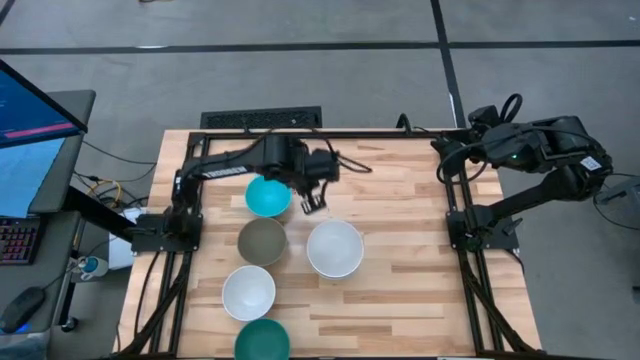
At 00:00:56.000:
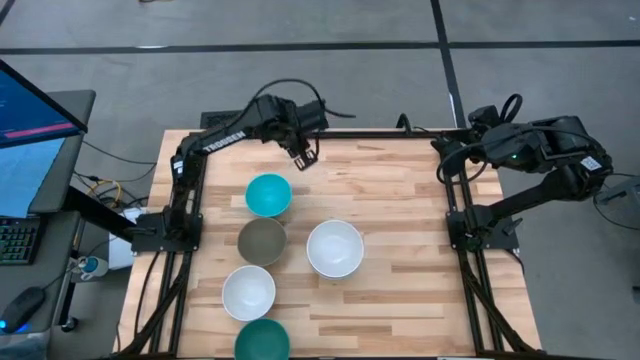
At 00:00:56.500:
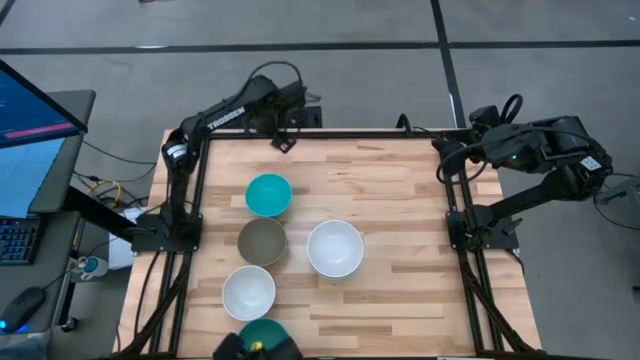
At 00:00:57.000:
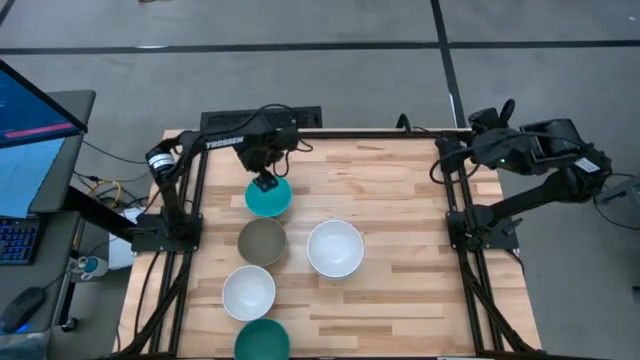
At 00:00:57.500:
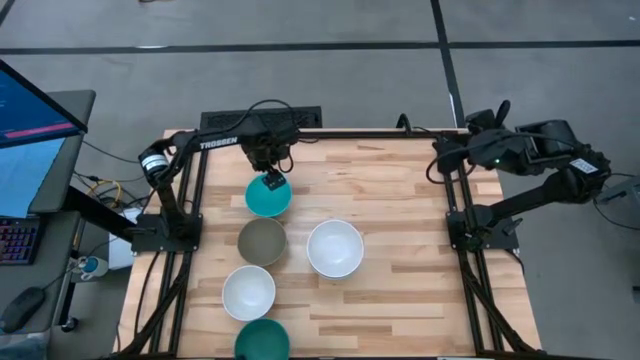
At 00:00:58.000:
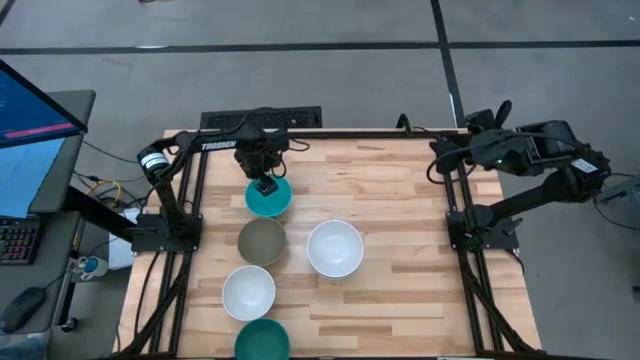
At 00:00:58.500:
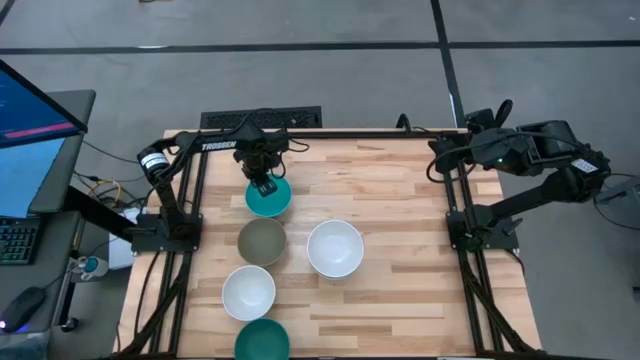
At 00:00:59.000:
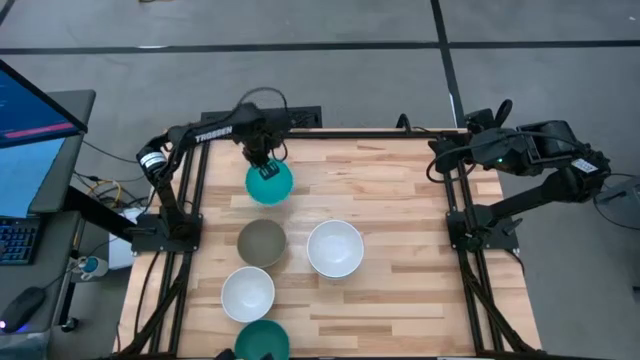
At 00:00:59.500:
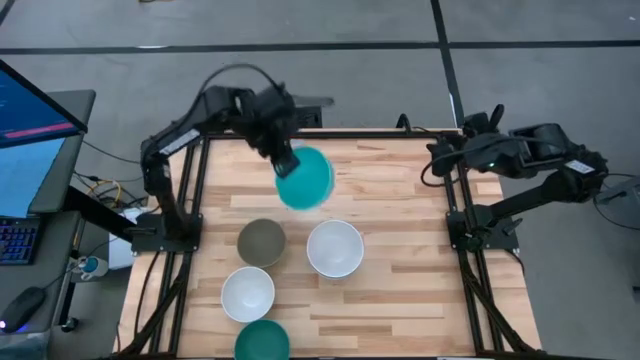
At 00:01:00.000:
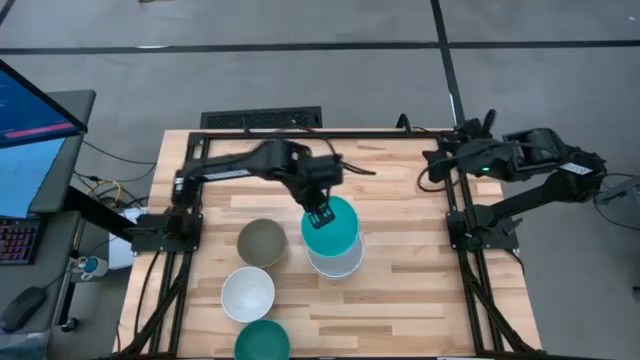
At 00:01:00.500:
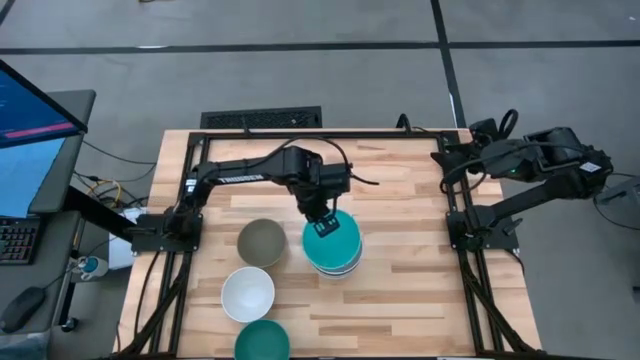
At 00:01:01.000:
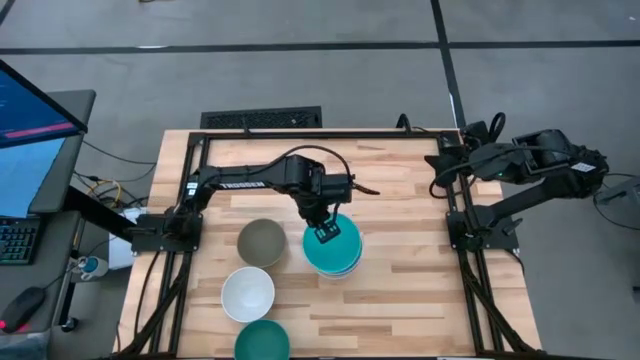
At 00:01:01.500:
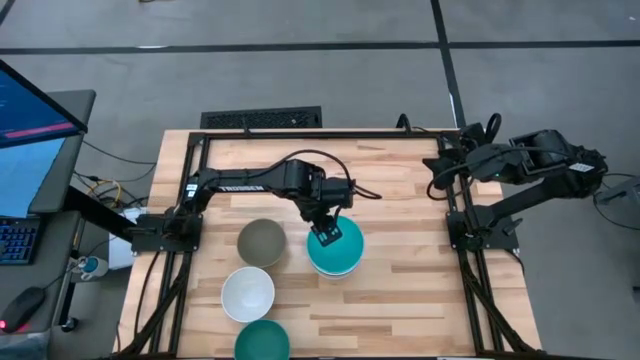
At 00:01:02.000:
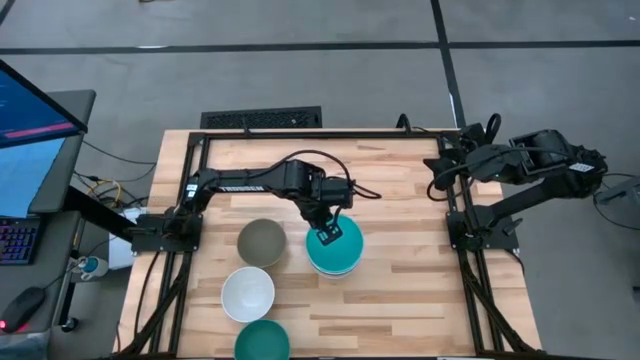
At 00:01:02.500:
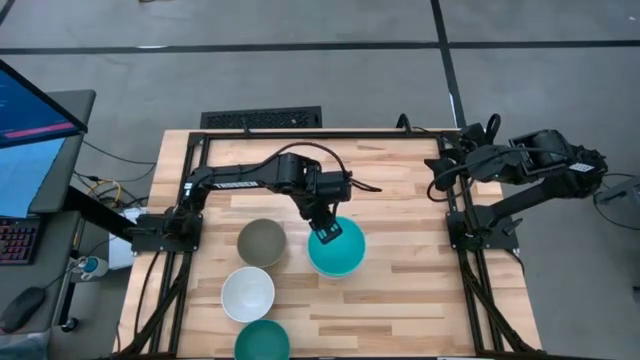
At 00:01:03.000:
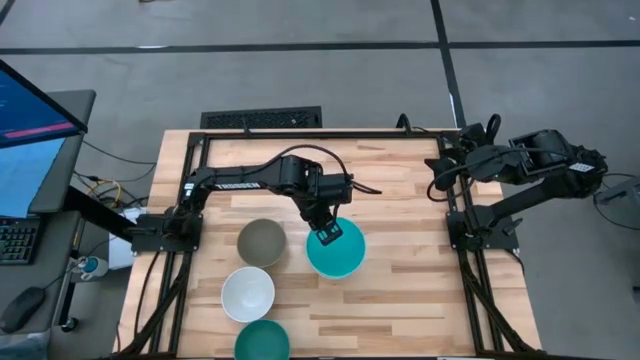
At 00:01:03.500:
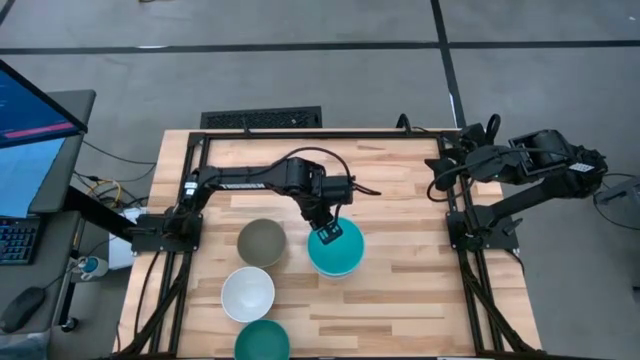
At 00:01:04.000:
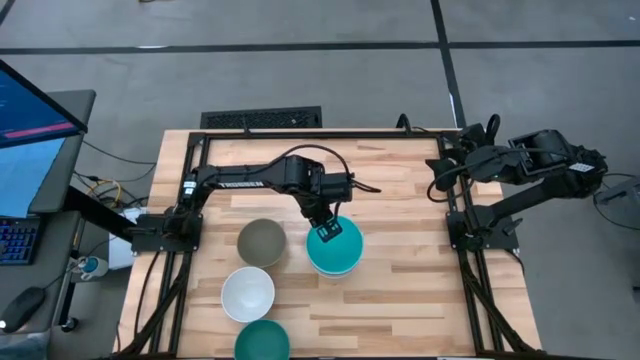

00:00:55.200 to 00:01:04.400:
Task: Nest bowls inside each other
Stack the blue bowl on the white bowl

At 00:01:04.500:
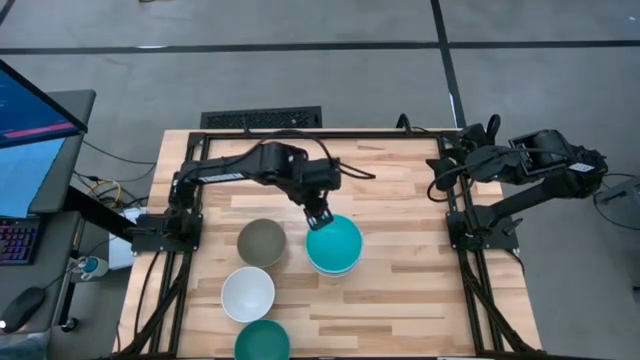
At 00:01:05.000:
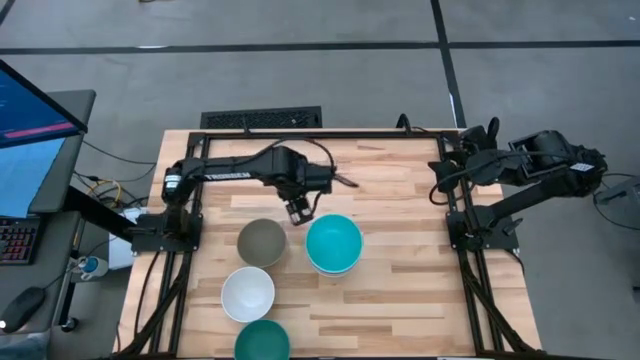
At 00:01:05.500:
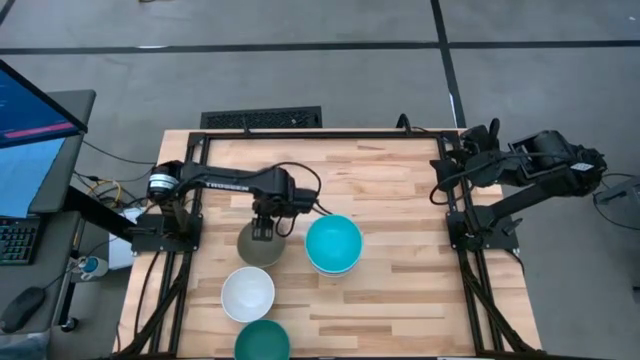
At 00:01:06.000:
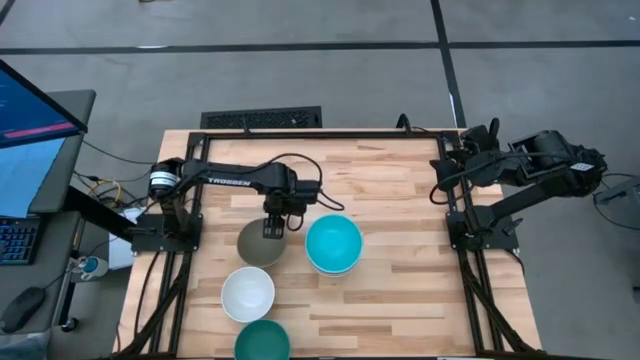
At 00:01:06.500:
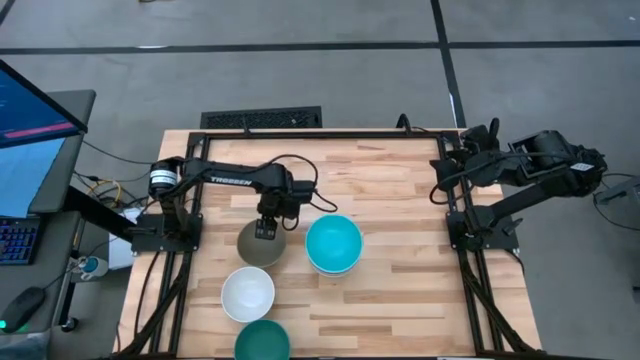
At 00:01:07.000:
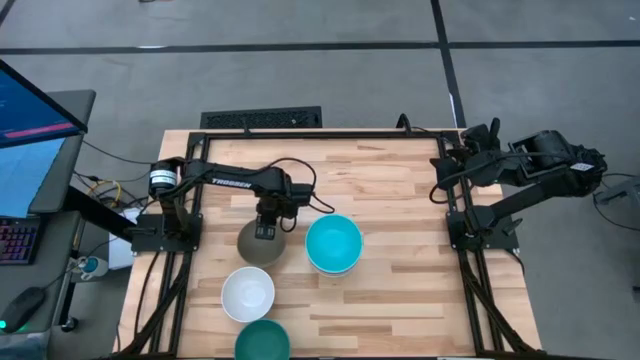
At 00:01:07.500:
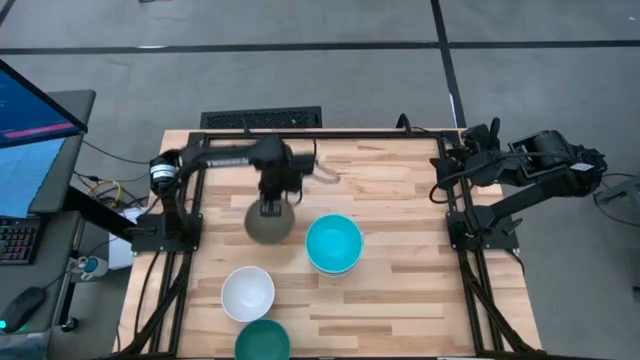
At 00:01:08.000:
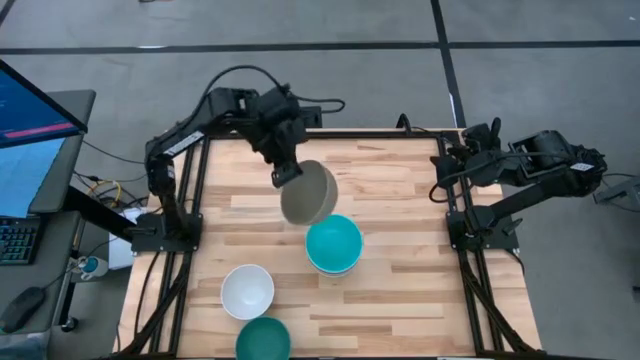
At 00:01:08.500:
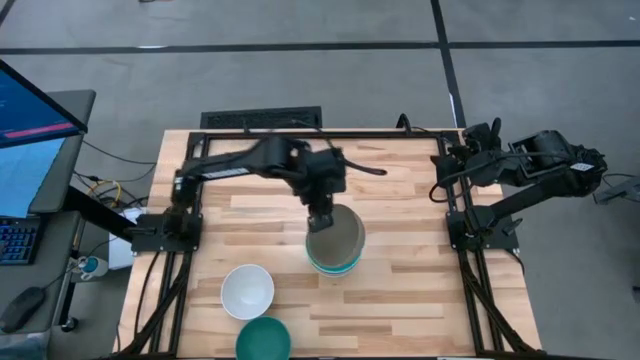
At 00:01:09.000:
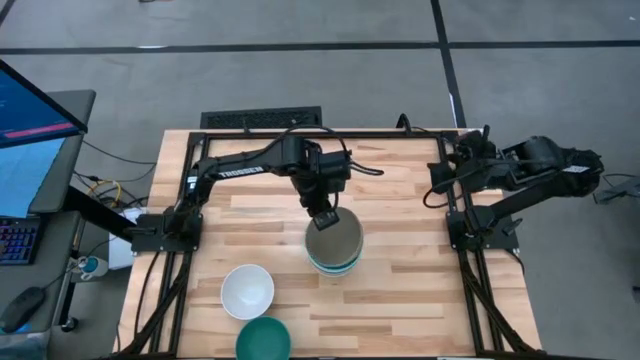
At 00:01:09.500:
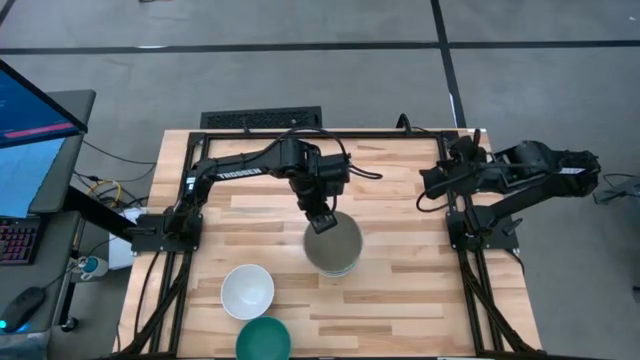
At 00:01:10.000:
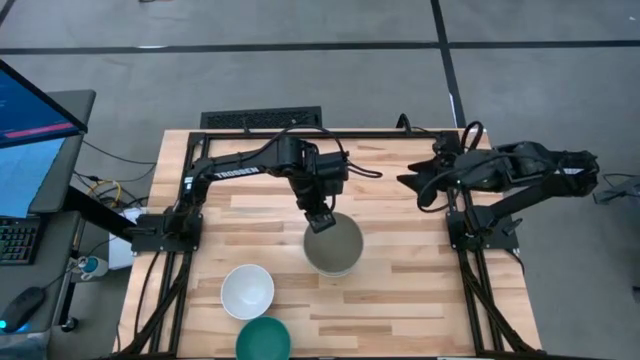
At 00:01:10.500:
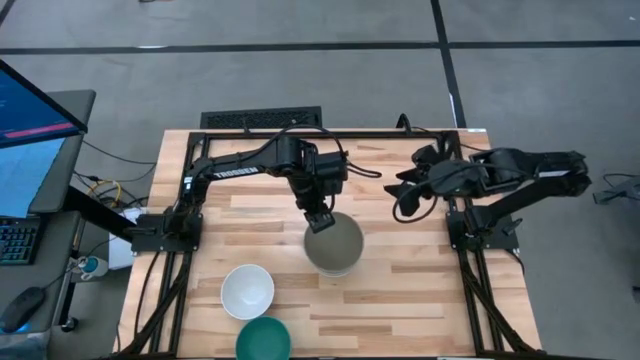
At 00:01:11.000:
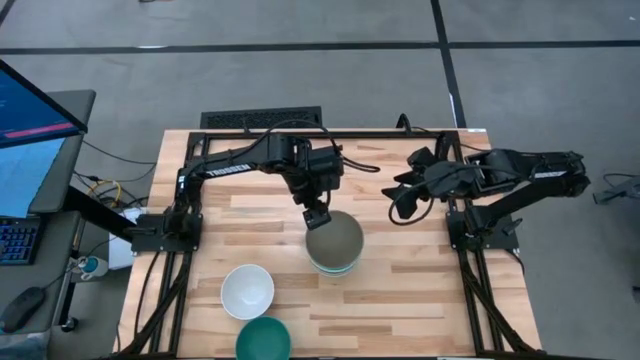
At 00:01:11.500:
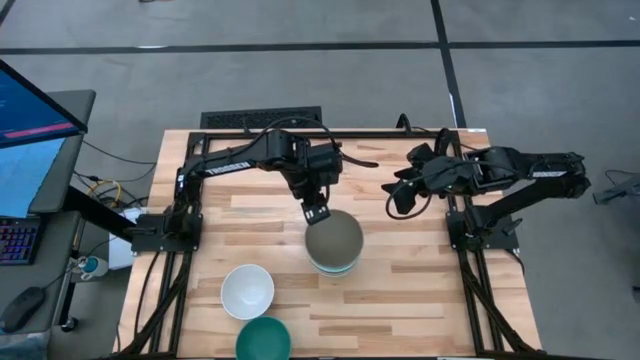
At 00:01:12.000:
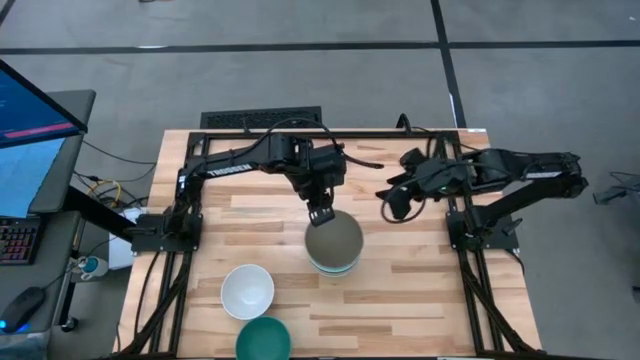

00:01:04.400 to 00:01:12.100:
Stack the gray bowl on the blue bowl

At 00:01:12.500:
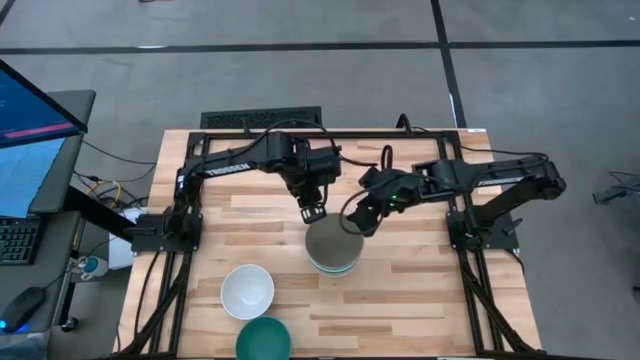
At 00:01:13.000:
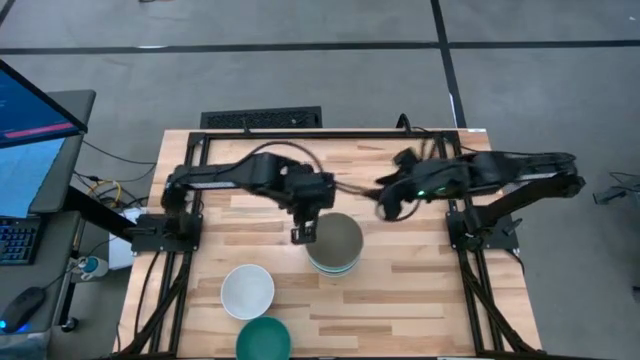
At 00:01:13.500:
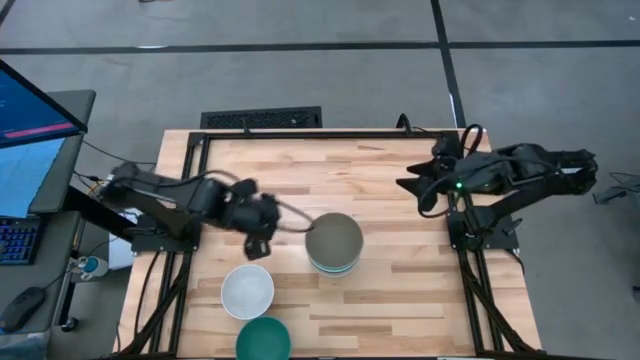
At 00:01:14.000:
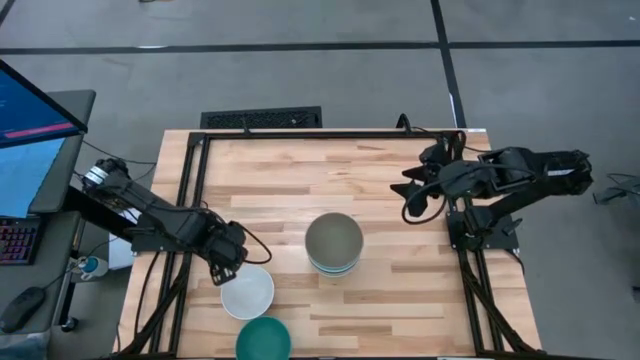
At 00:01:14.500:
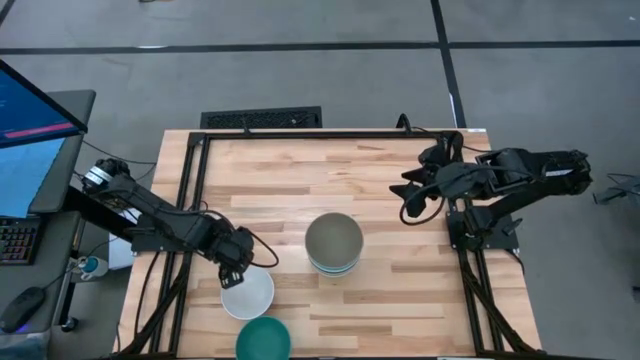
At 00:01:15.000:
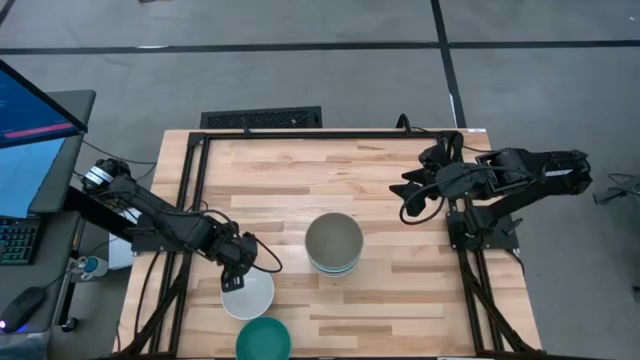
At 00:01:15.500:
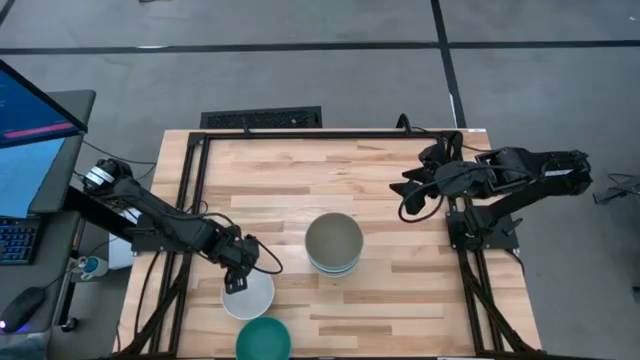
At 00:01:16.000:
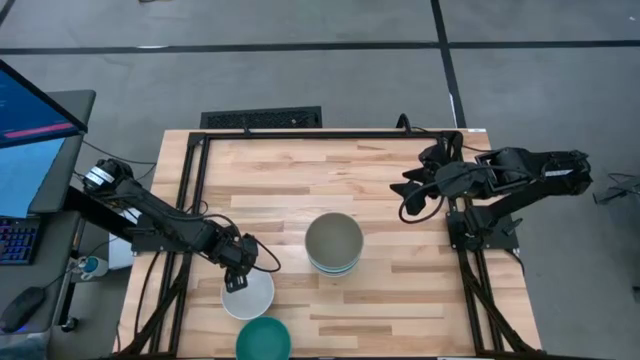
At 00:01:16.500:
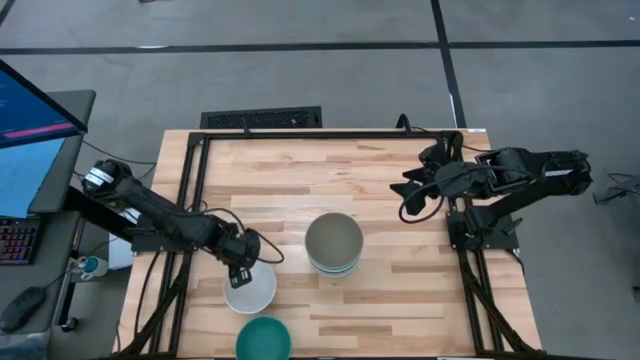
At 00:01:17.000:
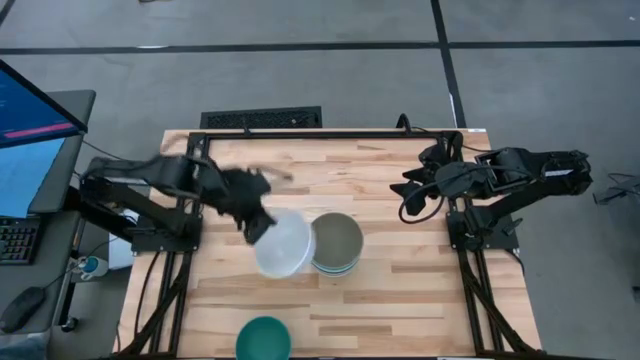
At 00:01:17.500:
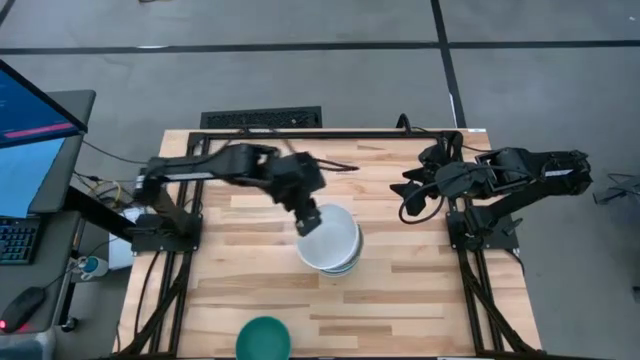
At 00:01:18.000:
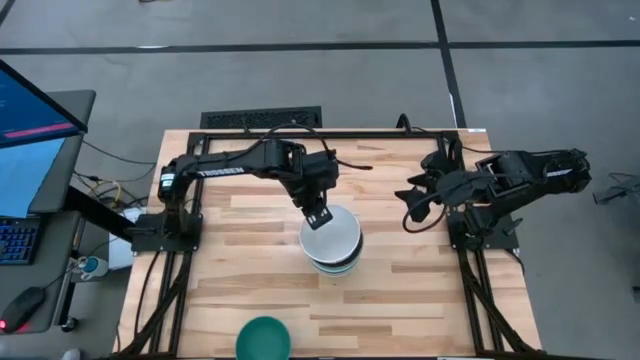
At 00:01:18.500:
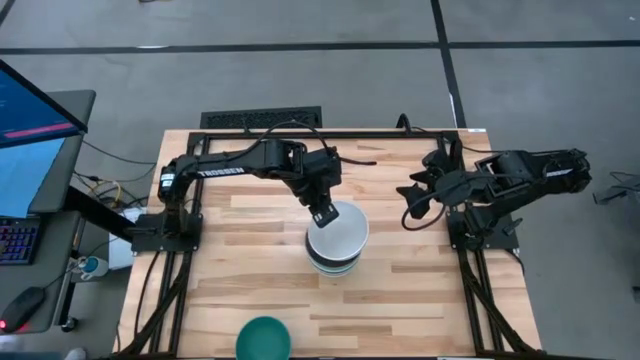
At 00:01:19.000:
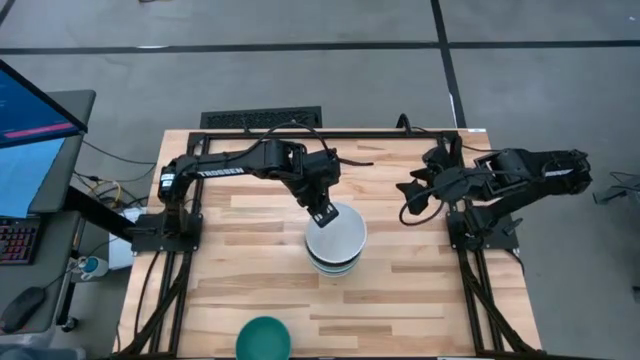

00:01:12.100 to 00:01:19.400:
Stack the white bowl on the gray bowl
